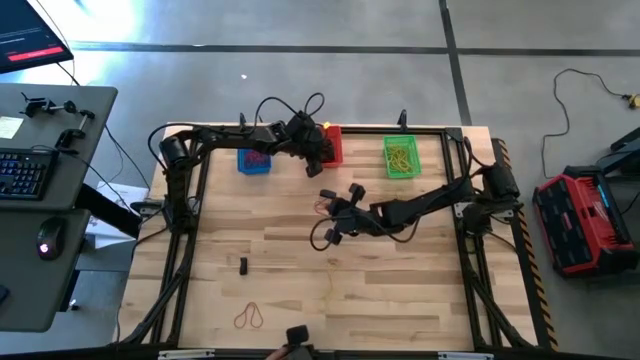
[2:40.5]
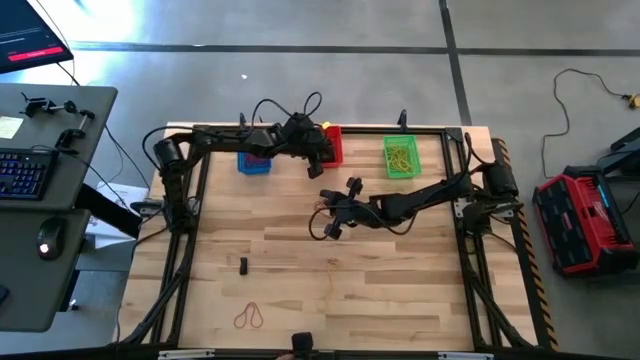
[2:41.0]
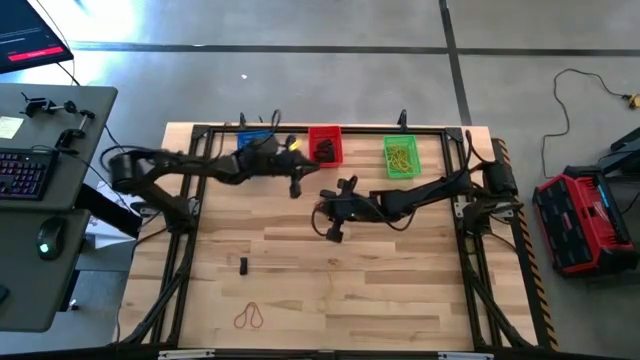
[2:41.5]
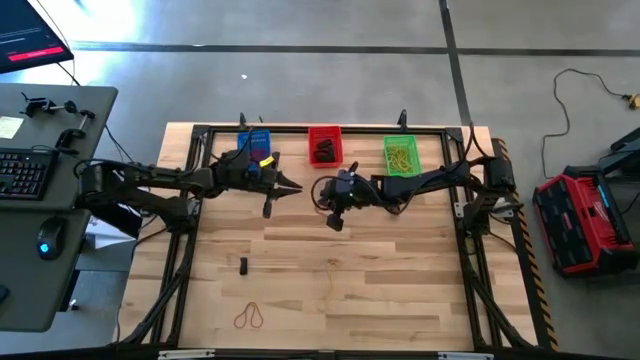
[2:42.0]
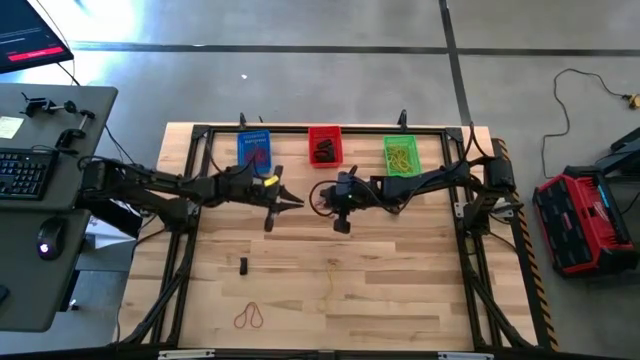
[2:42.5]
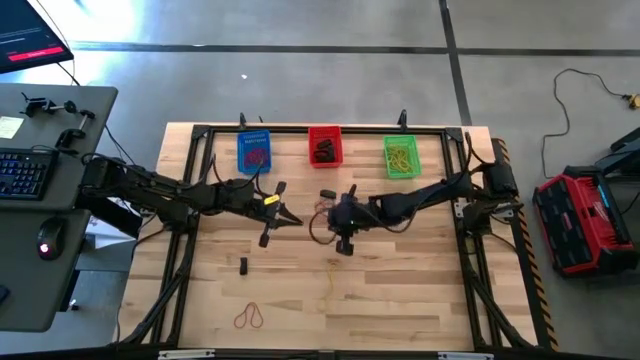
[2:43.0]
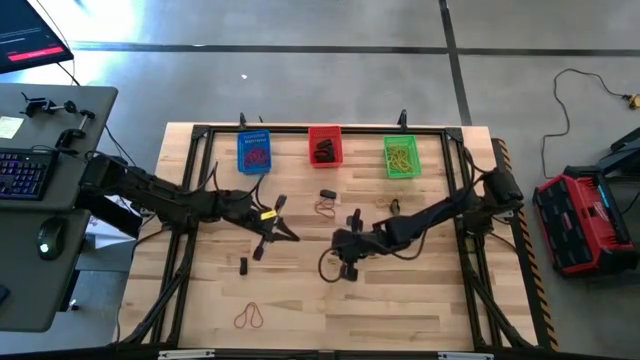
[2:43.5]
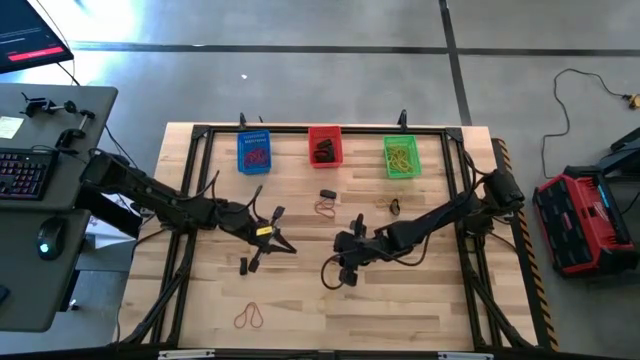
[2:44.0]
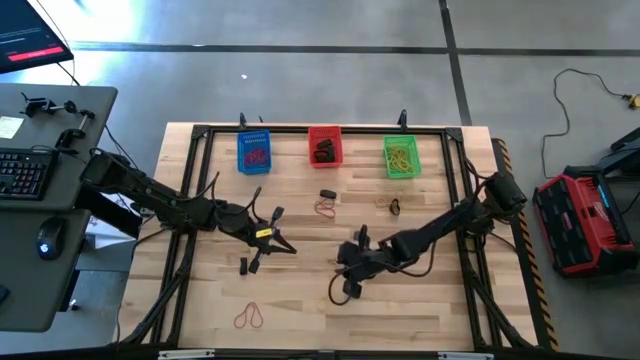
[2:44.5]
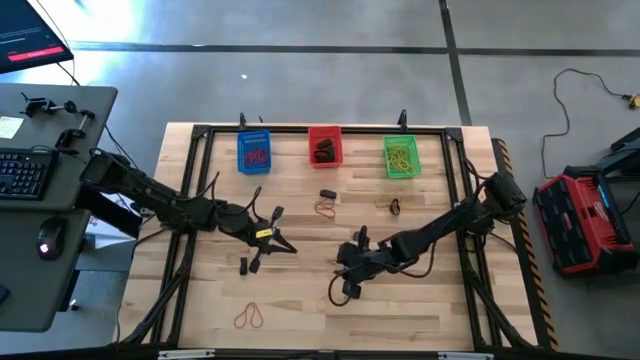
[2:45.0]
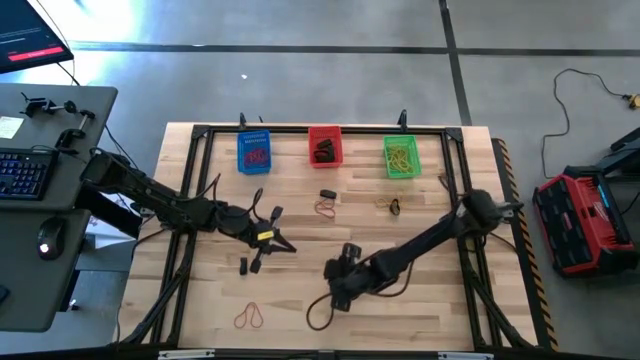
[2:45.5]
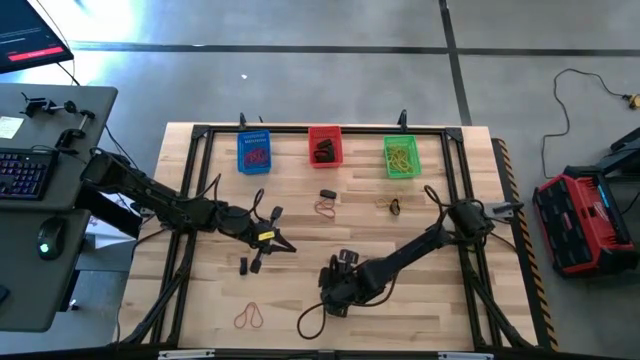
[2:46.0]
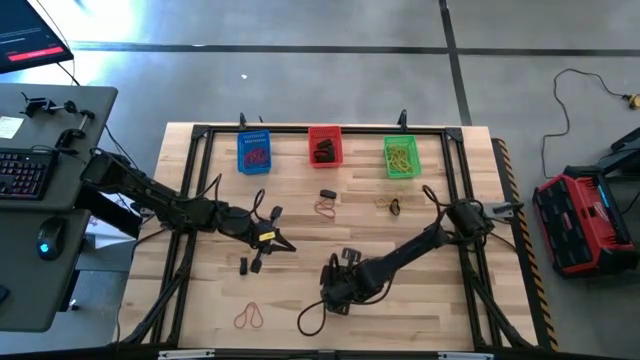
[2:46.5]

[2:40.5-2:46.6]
Task: Sort rubber bands into baskets
Put the yellow rubber band into the green bin

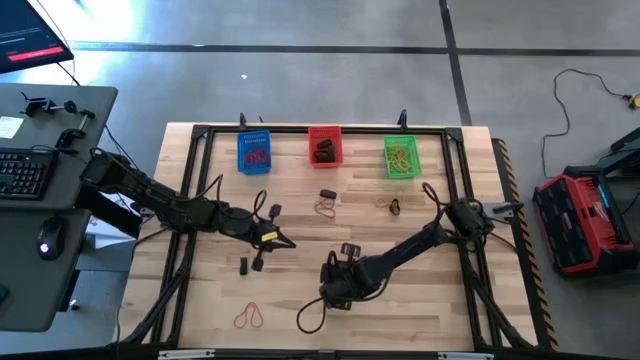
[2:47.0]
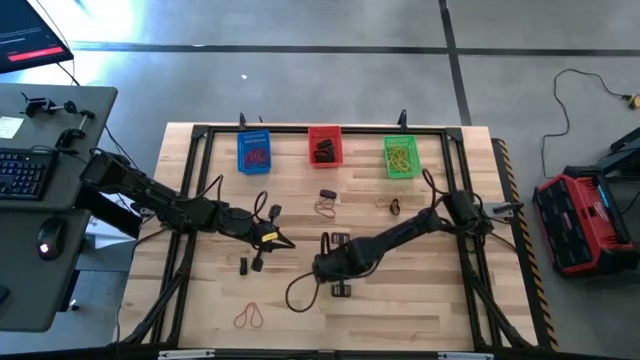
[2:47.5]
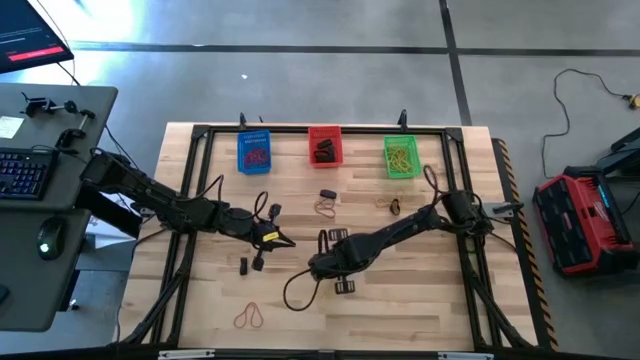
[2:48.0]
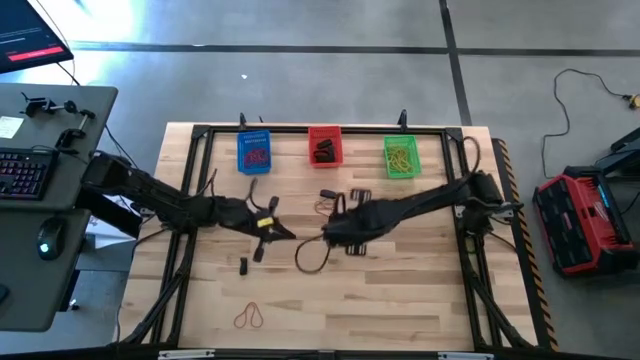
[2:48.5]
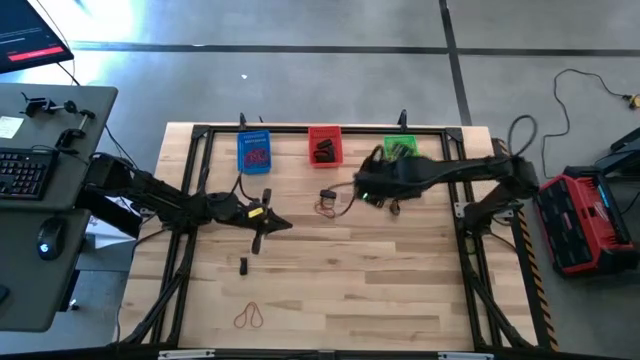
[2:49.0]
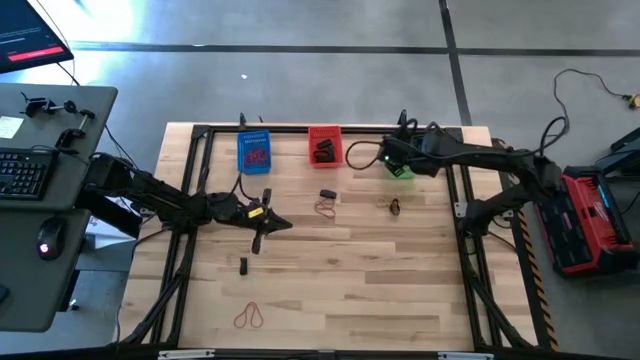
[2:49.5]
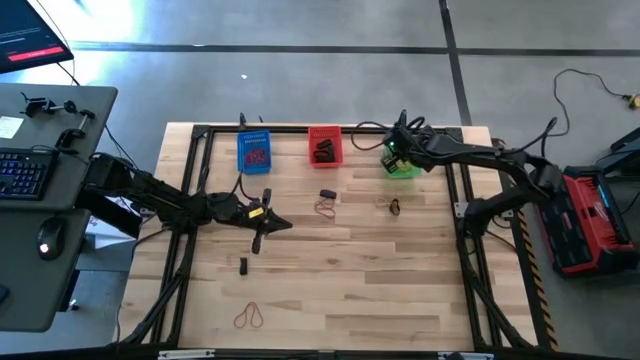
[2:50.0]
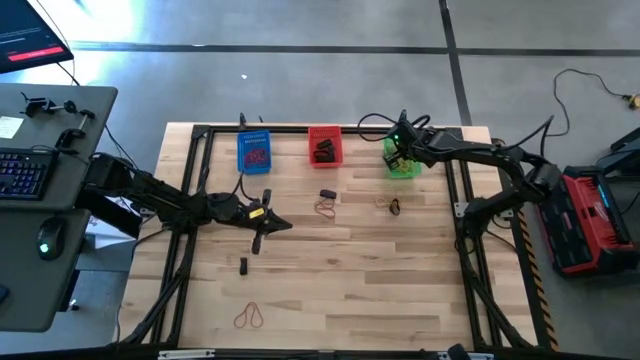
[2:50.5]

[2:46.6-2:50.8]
Put the yellow rubber band into the green bin

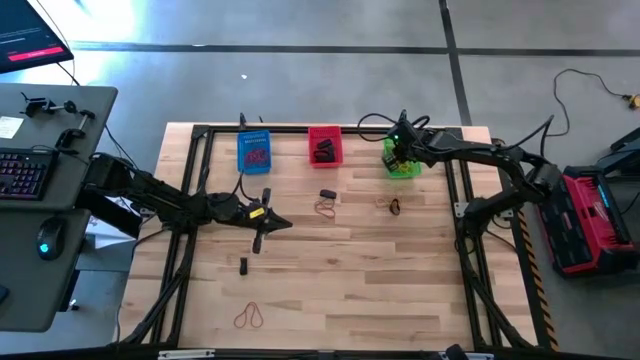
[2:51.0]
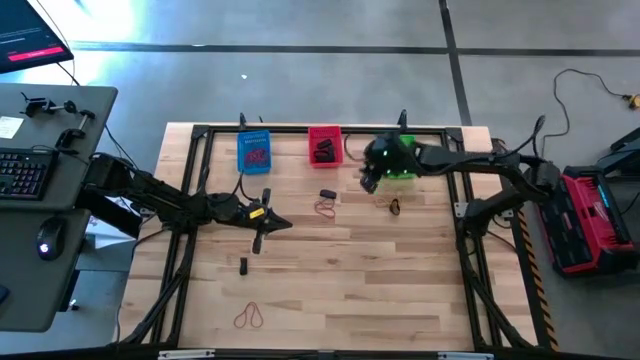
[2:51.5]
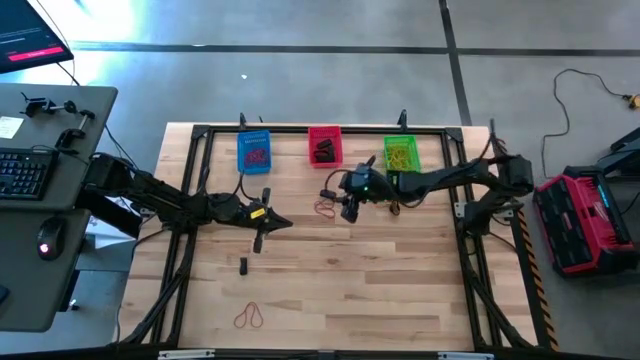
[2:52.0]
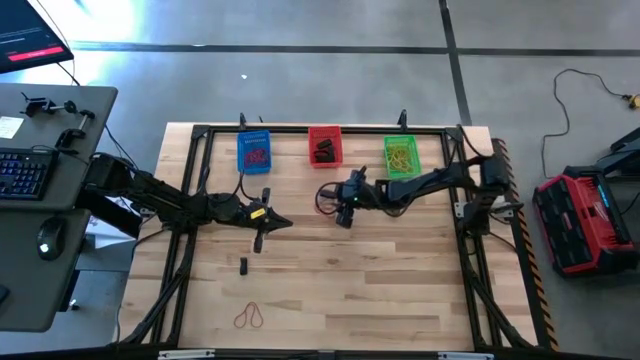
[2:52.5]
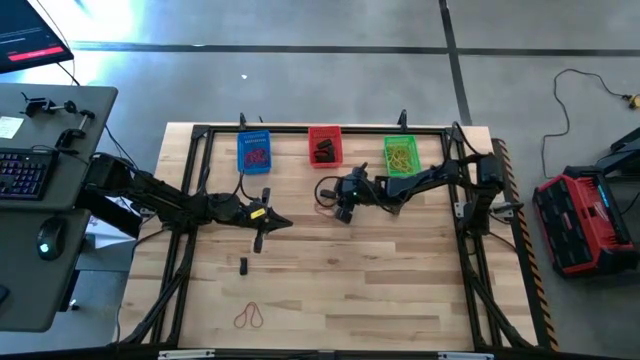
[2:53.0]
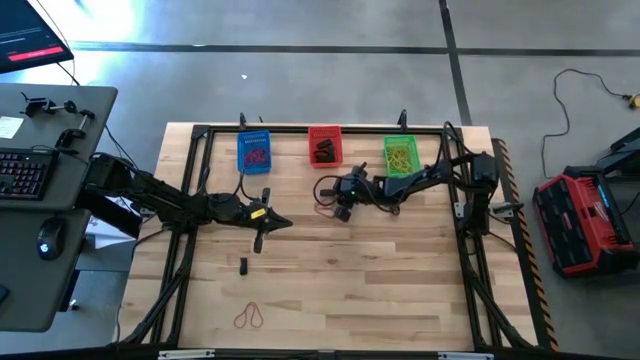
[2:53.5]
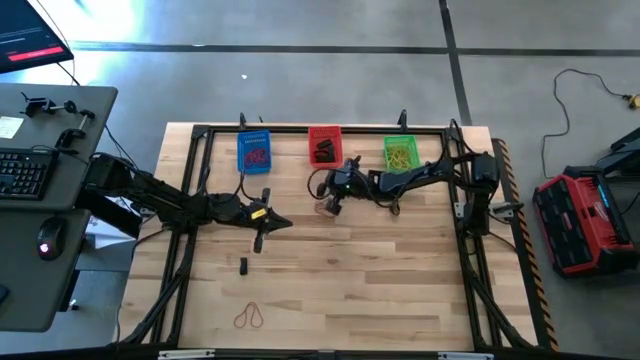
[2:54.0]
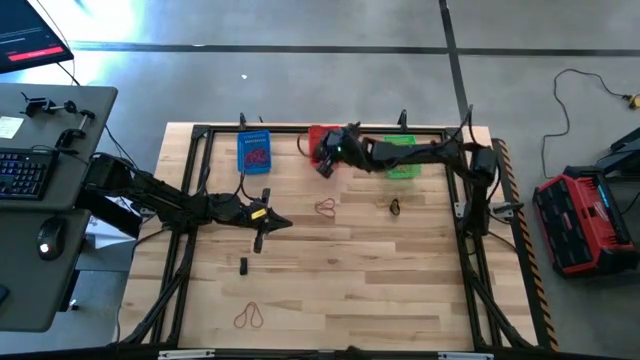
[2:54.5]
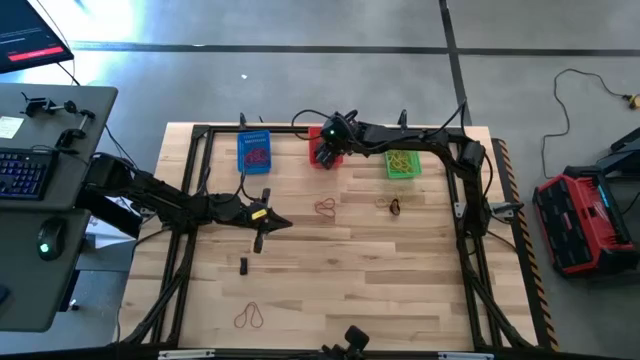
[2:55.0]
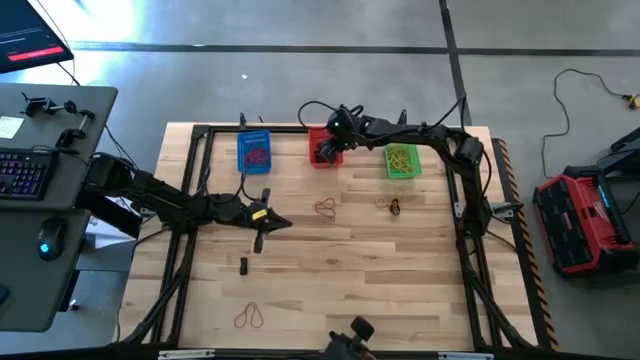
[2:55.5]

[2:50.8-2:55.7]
Put the black rubber band into the red bin

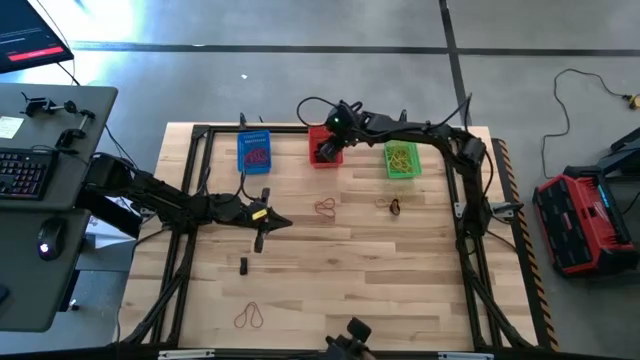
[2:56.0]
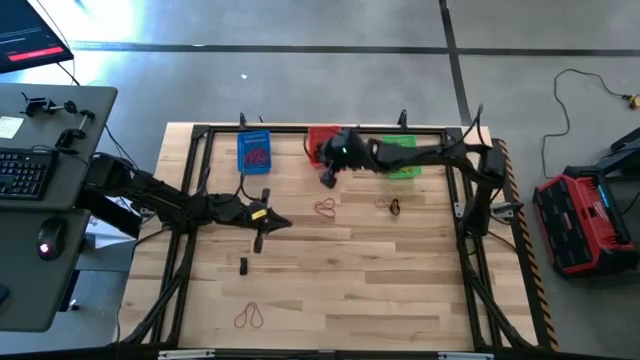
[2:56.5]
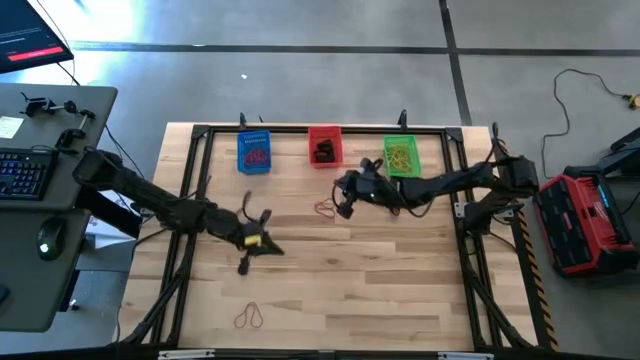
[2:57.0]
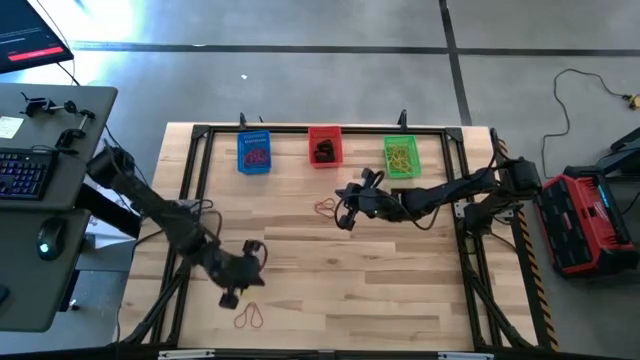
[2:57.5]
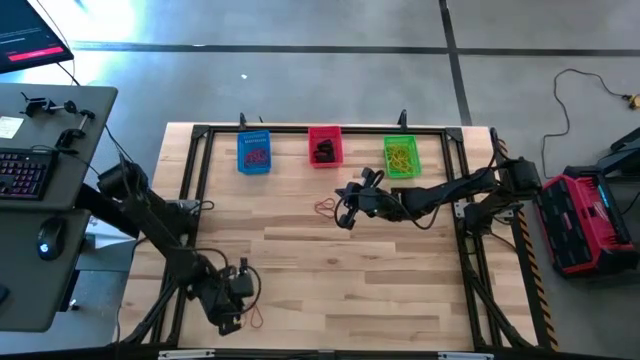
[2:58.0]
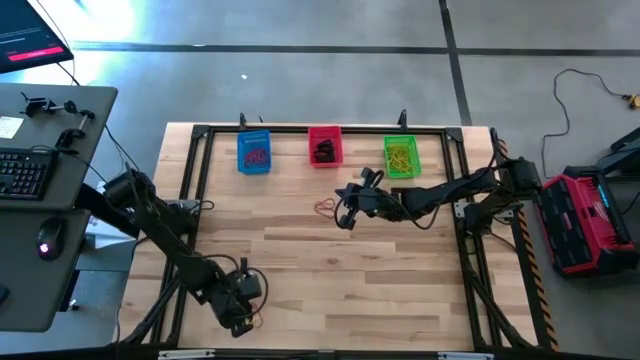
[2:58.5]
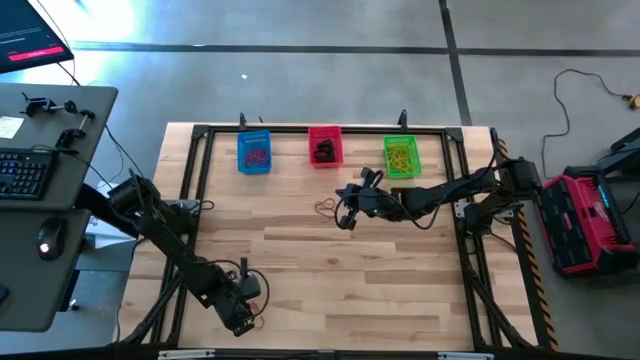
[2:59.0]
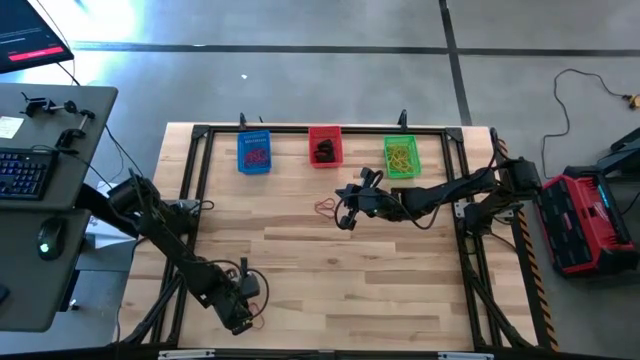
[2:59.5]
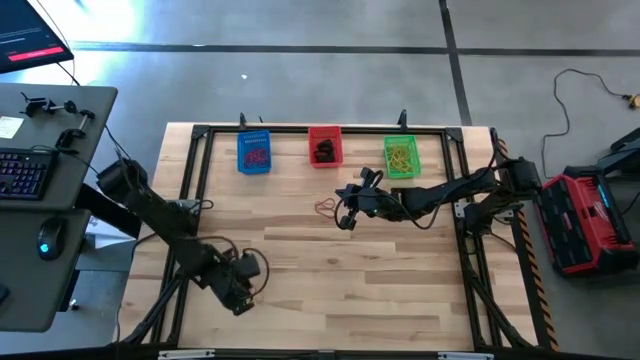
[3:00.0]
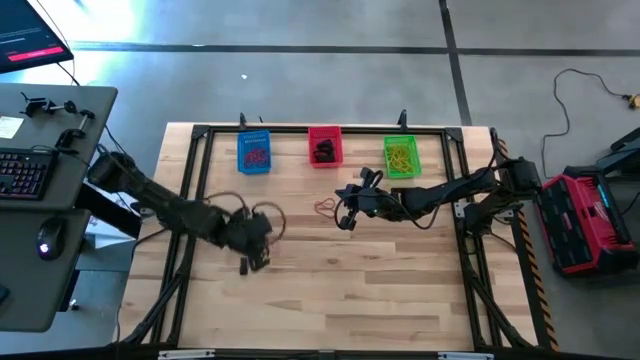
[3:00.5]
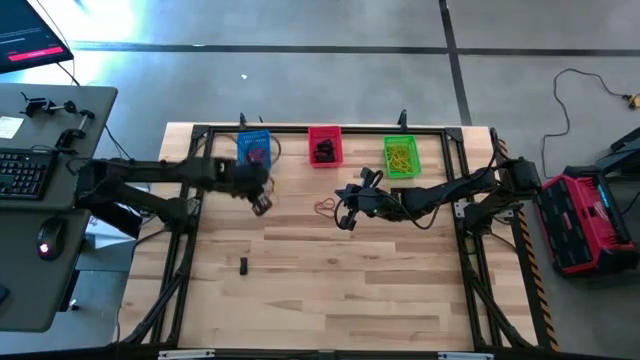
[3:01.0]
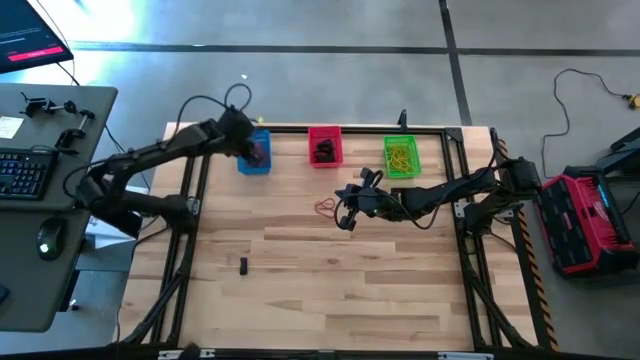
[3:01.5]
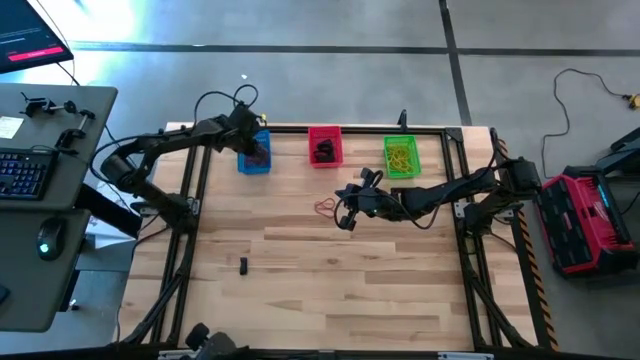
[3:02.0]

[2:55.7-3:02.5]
Put the red rubber band into the blue bin
